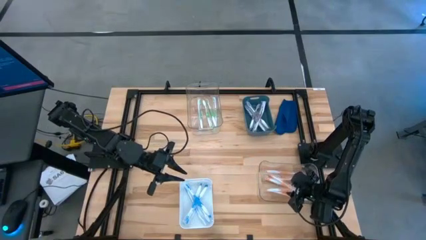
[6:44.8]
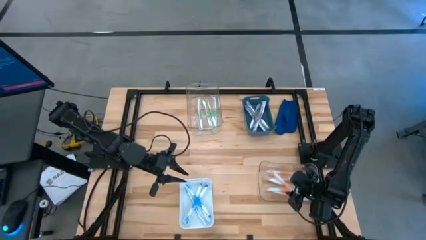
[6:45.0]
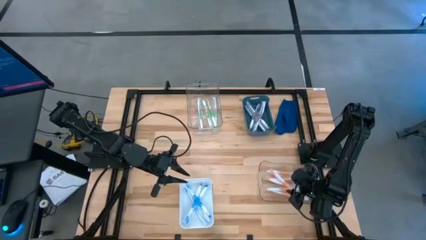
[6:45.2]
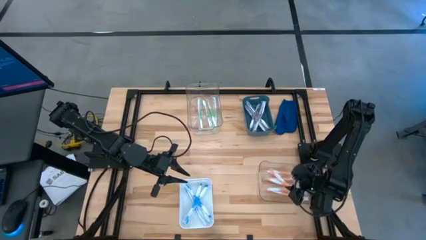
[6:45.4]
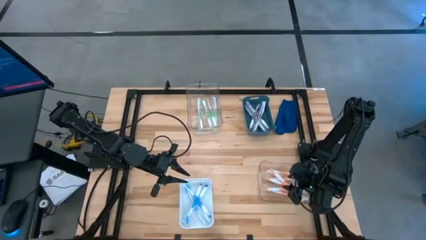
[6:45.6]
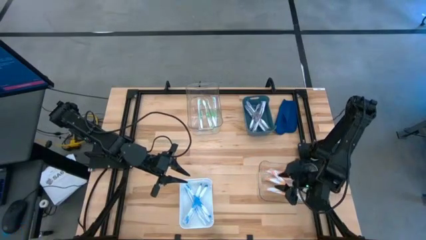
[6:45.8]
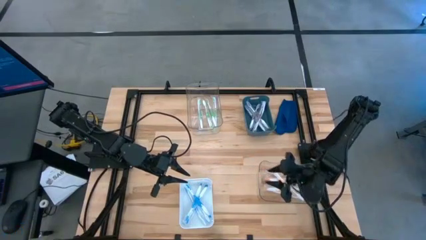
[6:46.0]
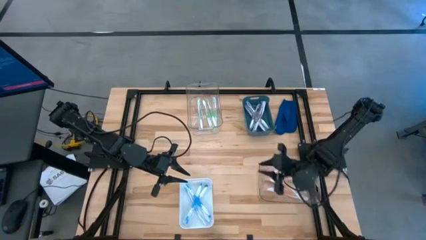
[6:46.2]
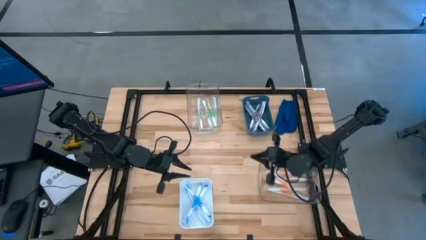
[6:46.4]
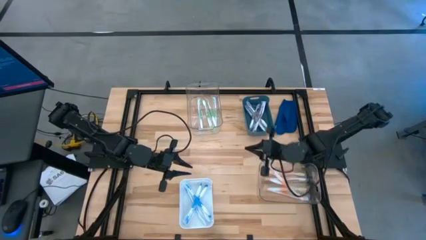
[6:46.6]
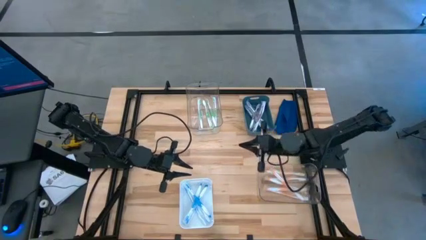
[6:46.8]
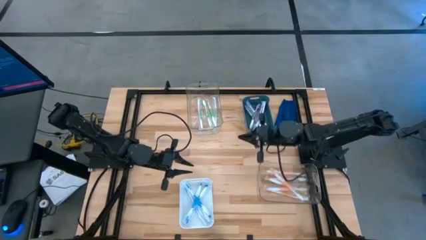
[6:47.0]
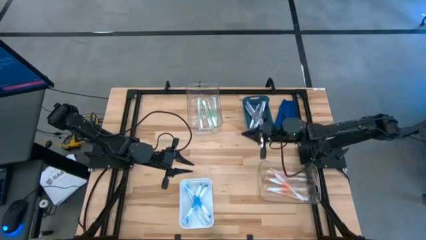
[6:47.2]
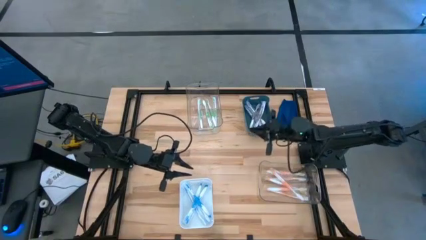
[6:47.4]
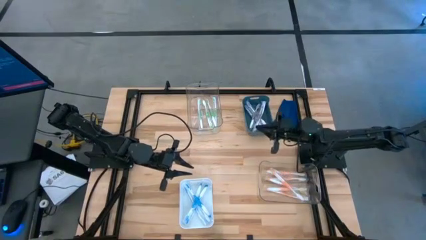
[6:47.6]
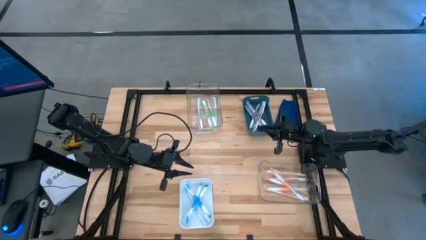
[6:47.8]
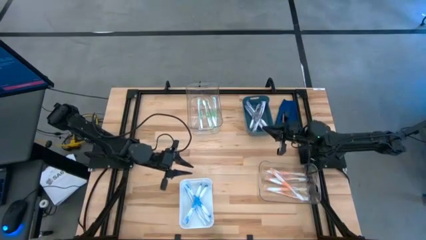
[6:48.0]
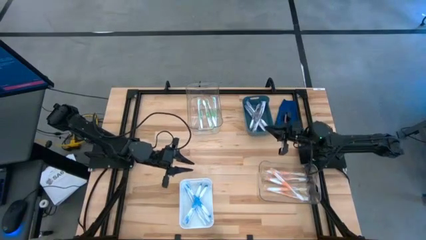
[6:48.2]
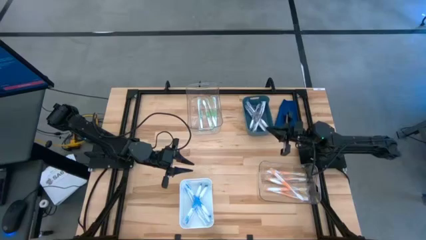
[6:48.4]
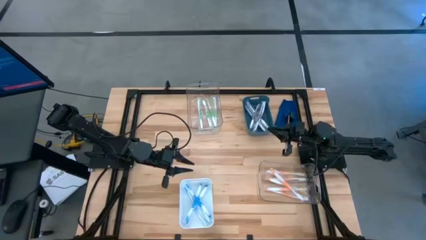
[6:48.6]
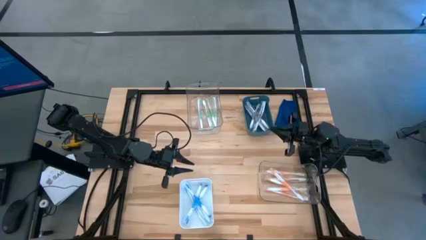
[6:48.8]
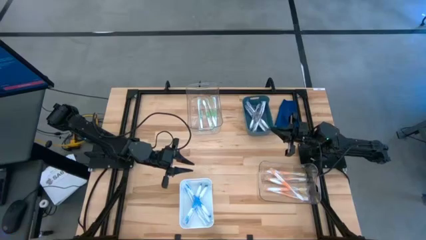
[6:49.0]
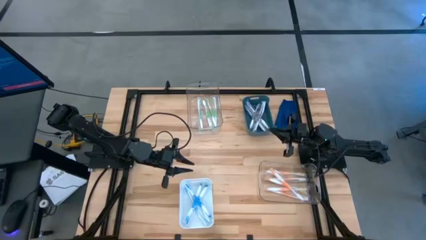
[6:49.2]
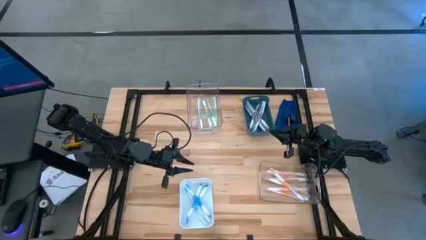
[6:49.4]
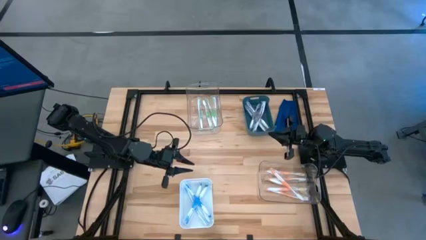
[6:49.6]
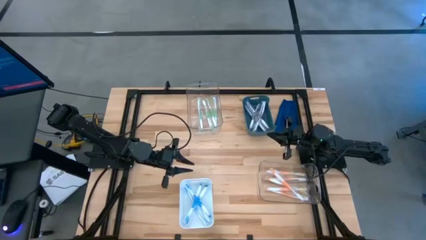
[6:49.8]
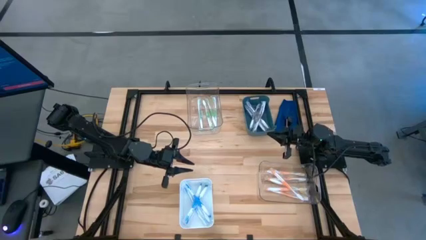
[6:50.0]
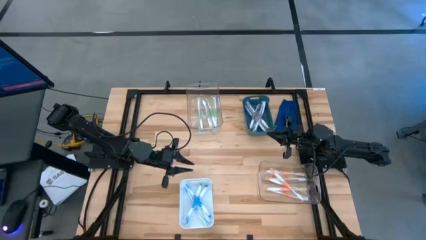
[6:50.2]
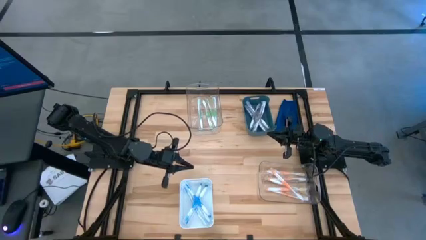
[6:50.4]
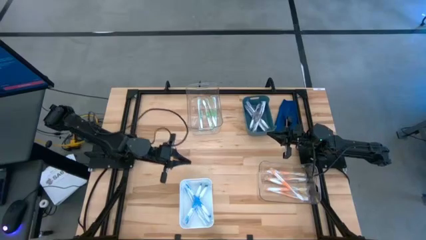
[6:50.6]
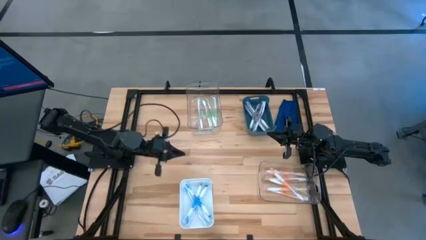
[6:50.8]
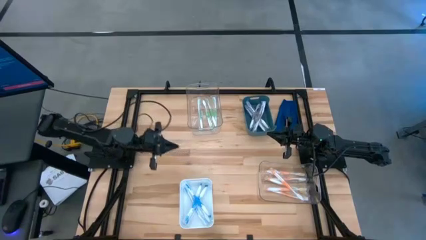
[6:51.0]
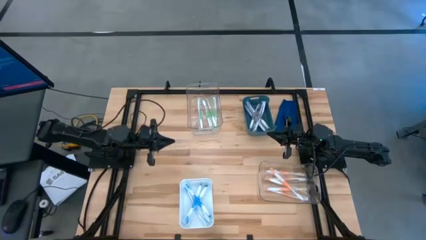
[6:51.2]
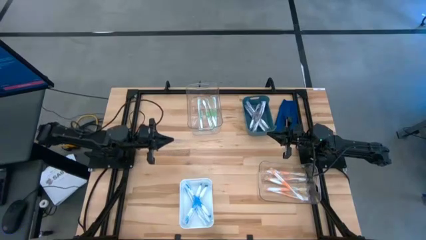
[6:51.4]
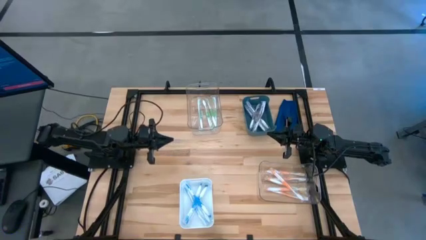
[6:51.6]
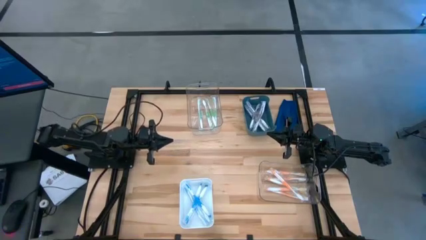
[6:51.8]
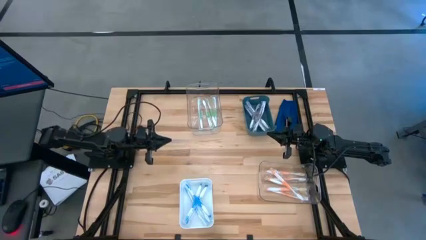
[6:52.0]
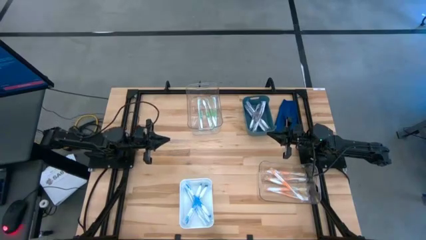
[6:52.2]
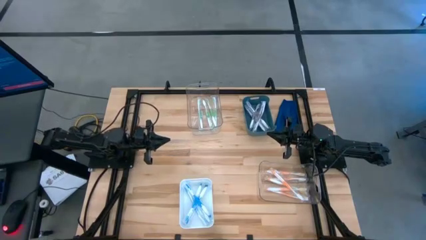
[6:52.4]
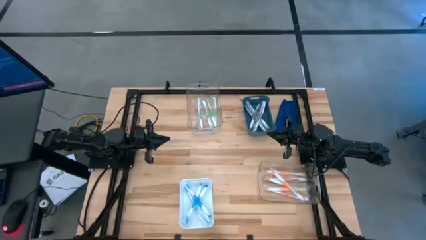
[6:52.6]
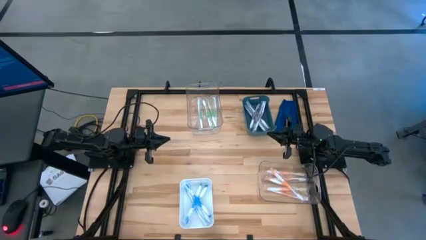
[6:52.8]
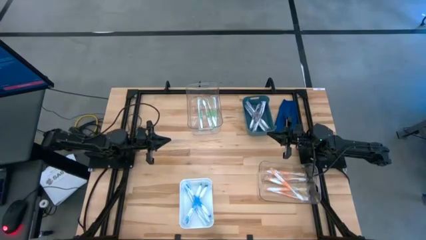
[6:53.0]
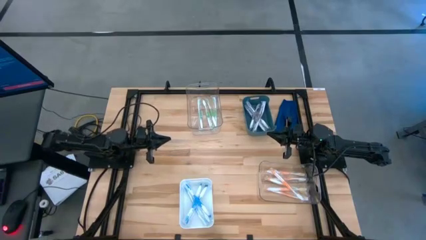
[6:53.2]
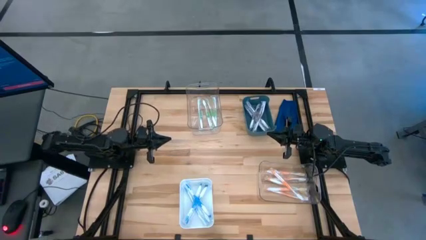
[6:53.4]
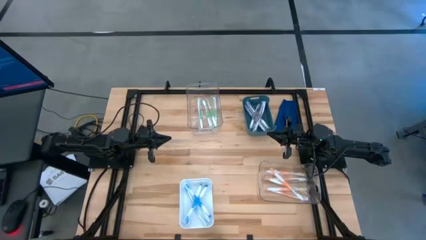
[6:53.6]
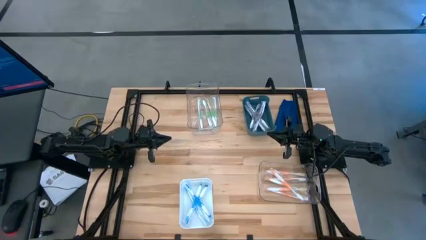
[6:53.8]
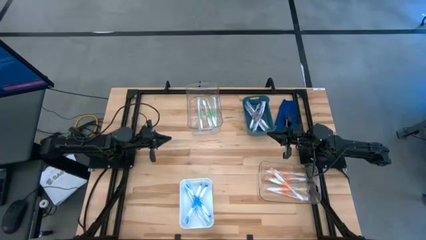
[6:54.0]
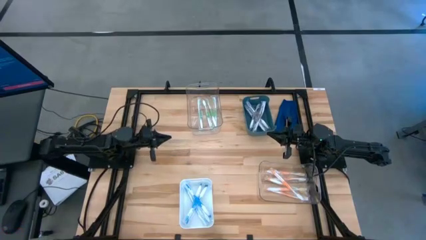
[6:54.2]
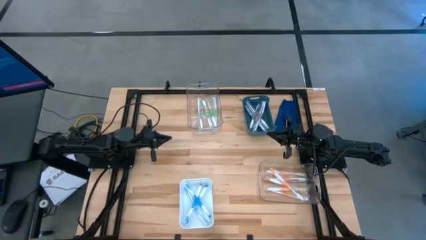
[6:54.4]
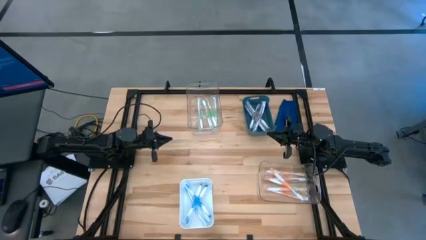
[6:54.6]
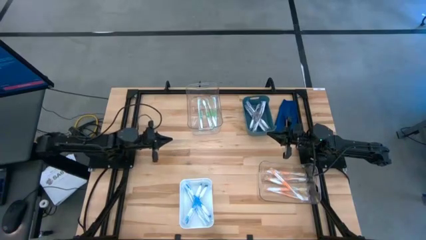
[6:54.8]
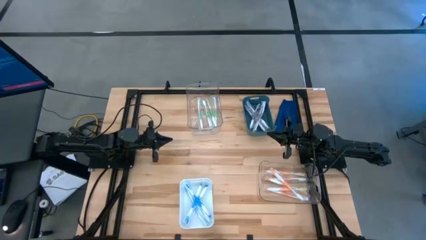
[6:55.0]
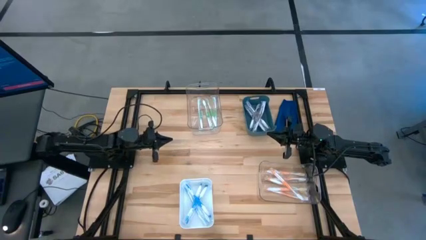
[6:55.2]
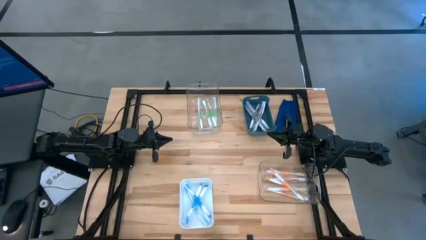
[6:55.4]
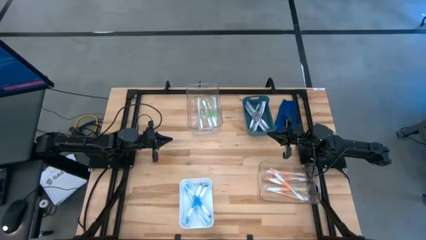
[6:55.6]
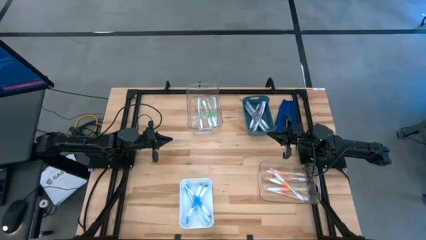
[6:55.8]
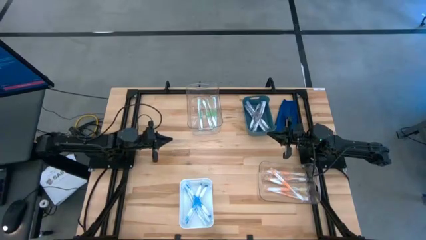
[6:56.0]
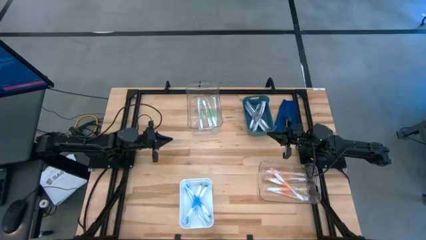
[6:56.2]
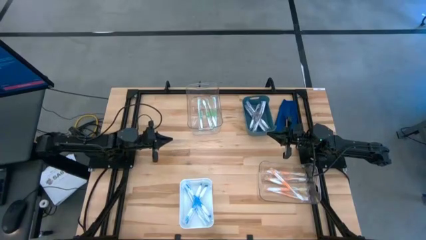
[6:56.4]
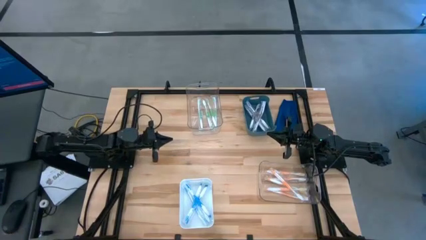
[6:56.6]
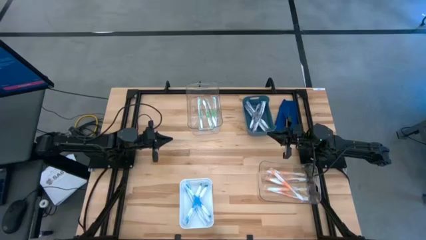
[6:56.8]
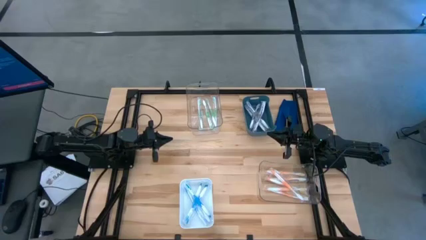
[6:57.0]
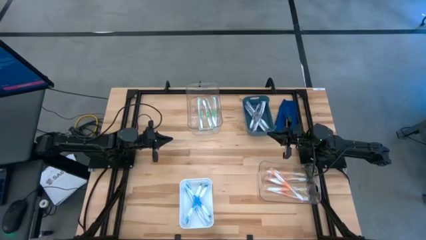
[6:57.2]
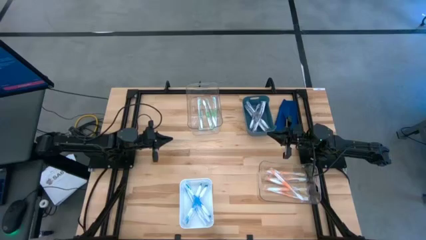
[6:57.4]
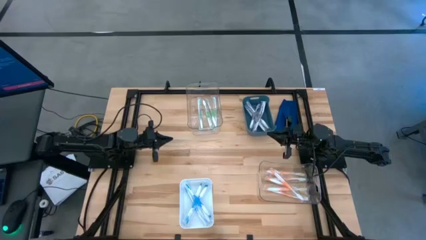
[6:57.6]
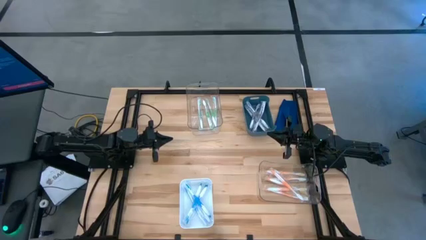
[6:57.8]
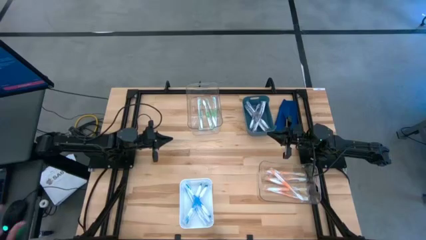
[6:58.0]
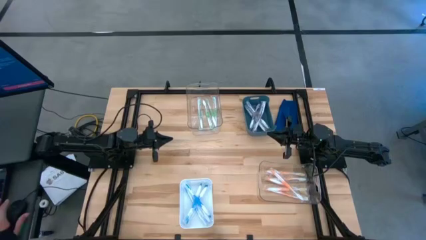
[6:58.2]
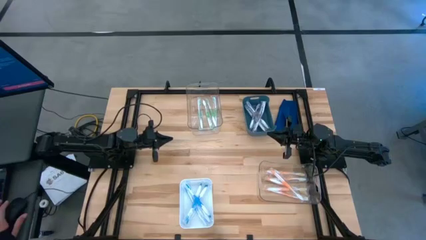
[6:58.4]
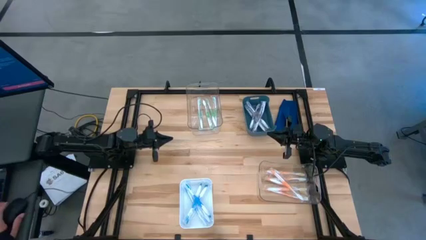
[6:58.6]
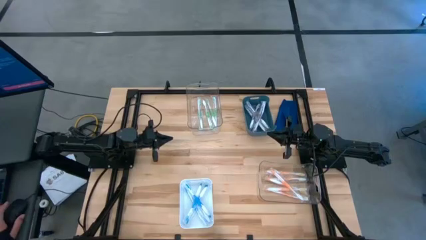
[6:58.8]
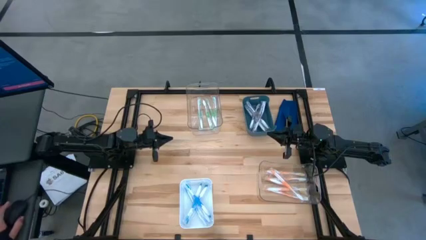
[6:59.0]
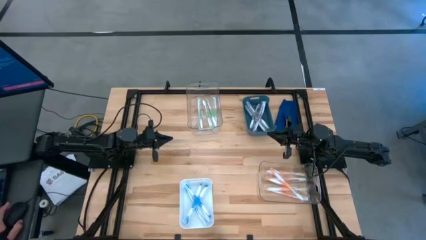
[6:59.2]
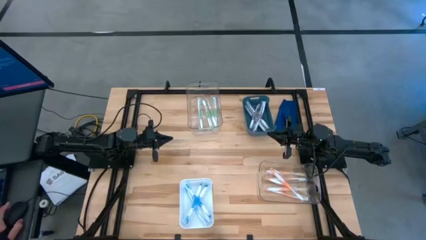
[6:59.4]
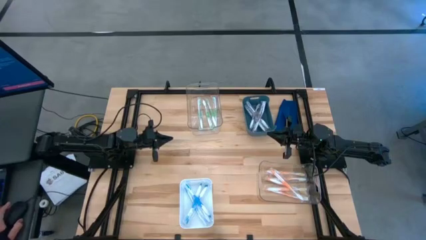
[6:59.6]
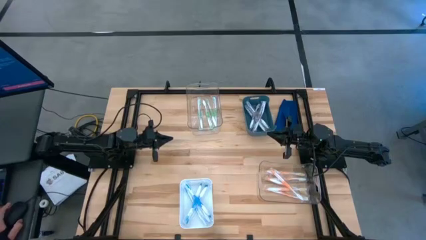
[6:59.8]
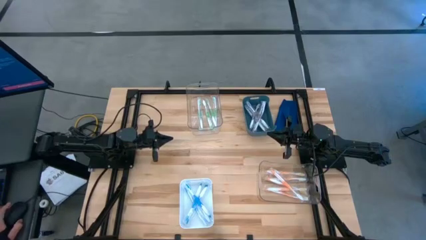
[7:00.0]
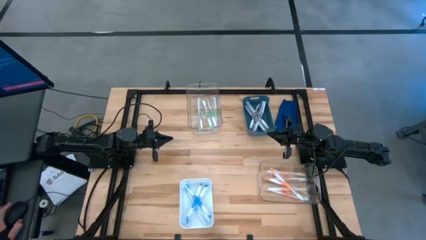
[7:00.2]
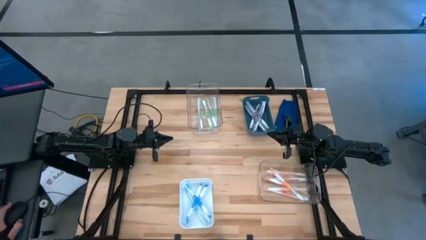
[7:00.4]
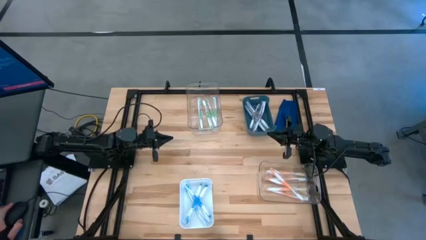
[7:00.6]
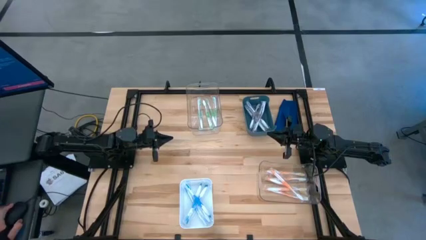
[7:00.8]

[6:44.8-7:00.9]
Task: Pick & Place Toothbrushes
Return to Home Position
